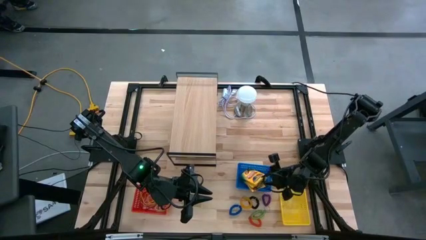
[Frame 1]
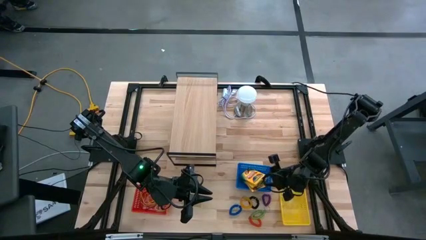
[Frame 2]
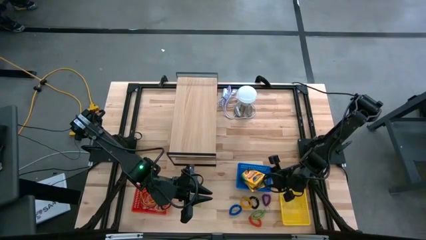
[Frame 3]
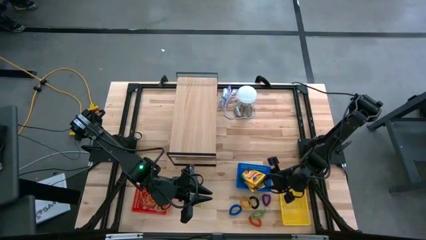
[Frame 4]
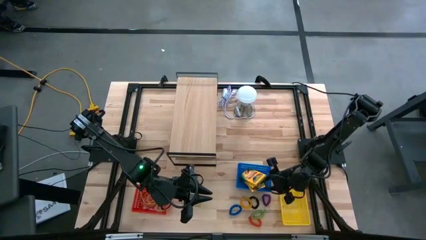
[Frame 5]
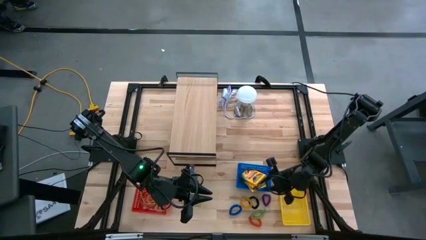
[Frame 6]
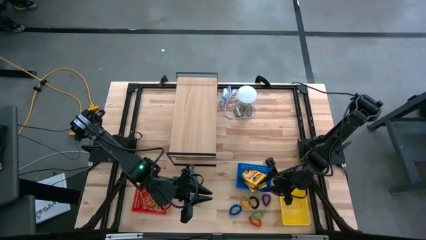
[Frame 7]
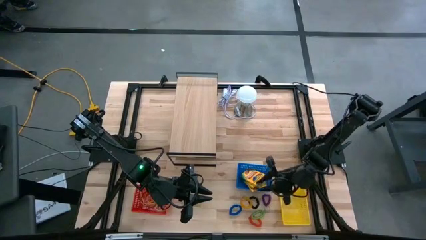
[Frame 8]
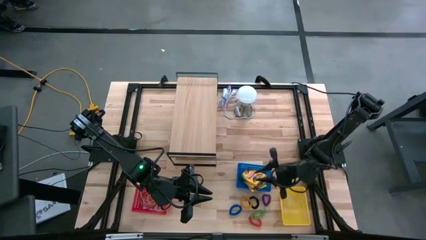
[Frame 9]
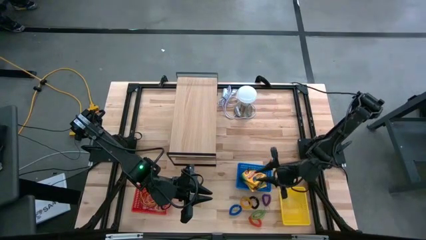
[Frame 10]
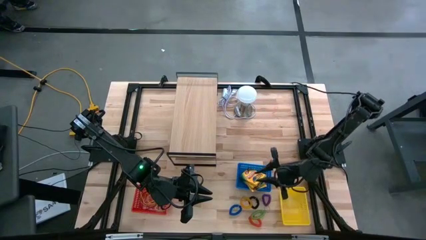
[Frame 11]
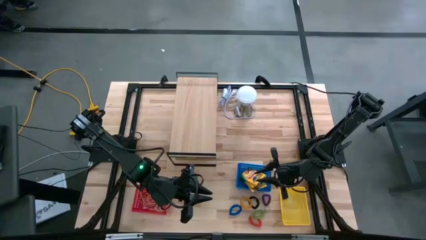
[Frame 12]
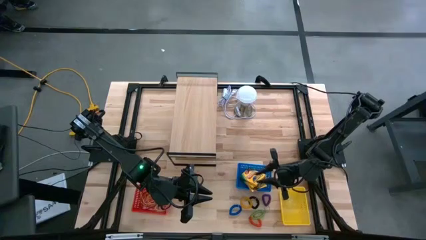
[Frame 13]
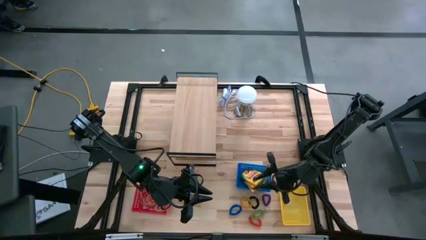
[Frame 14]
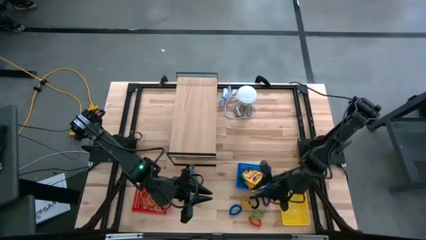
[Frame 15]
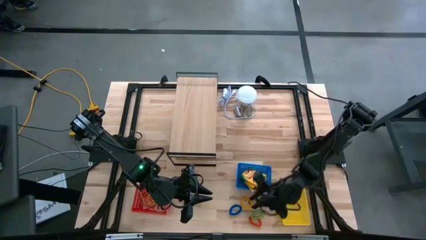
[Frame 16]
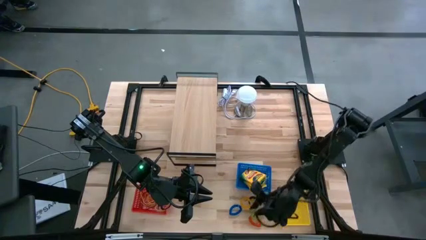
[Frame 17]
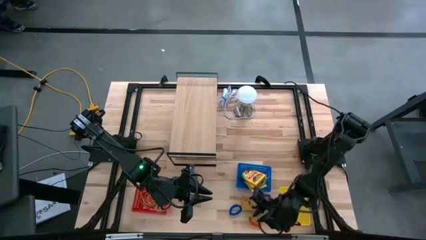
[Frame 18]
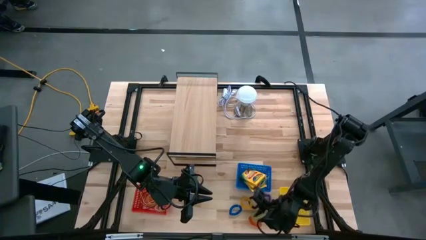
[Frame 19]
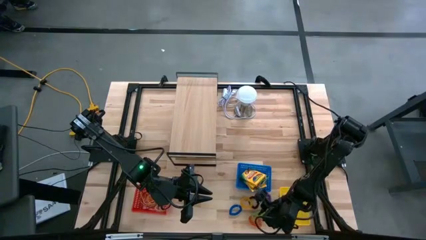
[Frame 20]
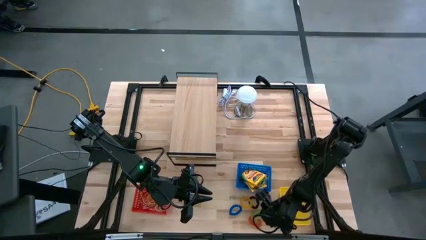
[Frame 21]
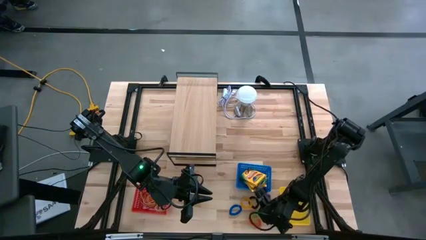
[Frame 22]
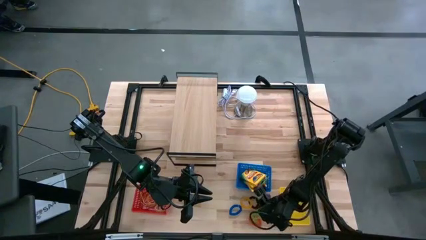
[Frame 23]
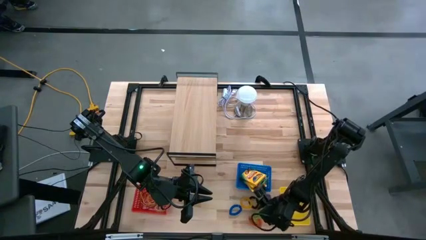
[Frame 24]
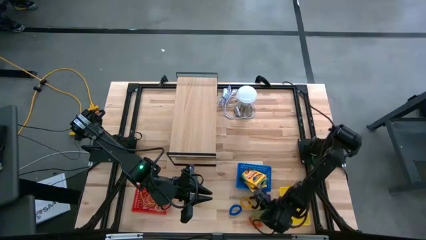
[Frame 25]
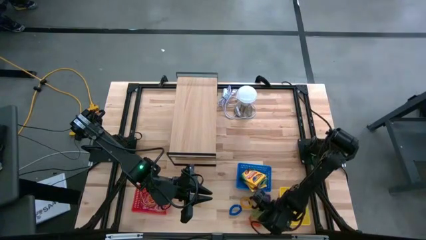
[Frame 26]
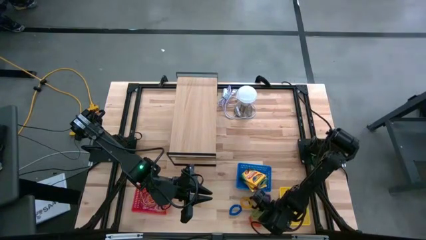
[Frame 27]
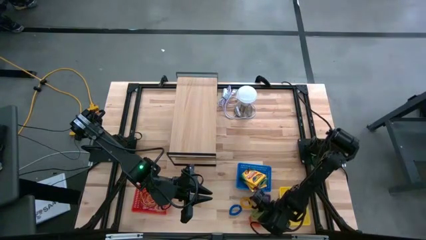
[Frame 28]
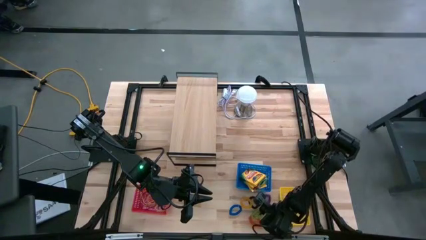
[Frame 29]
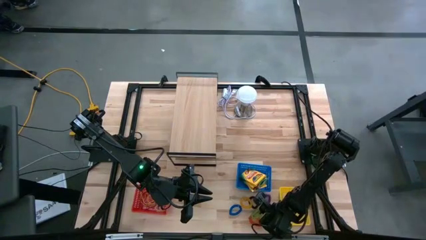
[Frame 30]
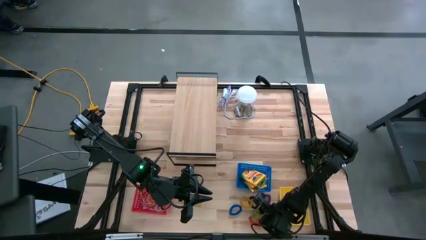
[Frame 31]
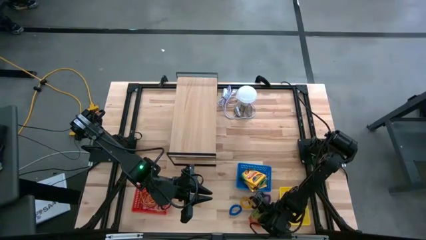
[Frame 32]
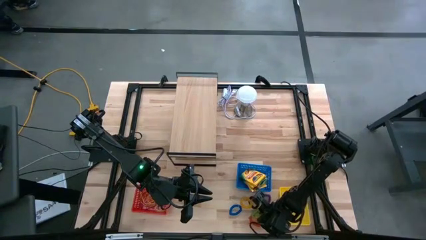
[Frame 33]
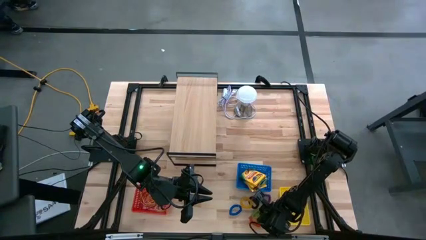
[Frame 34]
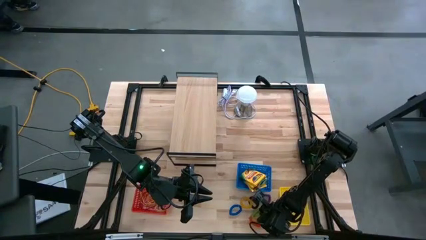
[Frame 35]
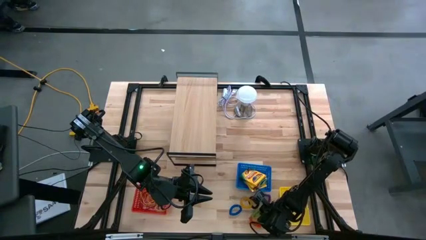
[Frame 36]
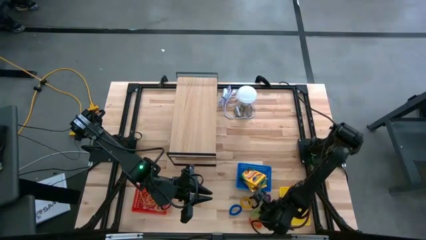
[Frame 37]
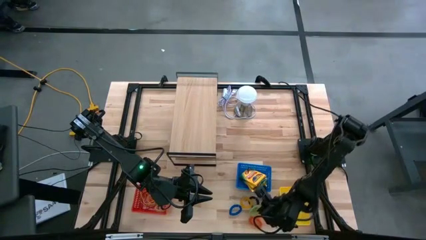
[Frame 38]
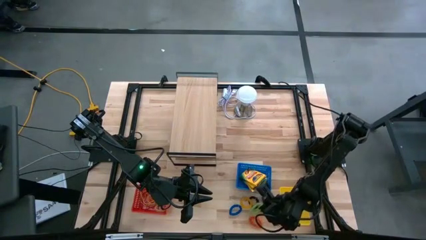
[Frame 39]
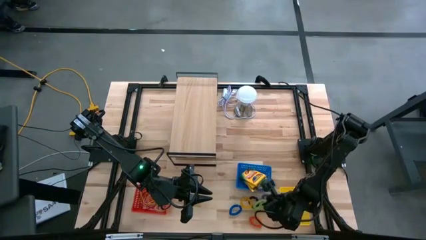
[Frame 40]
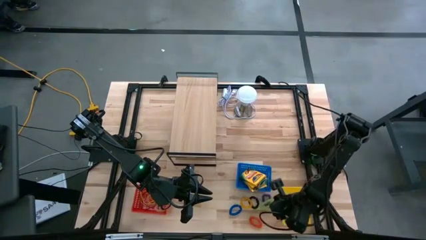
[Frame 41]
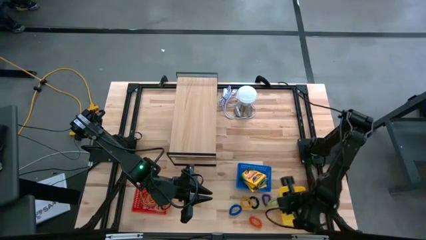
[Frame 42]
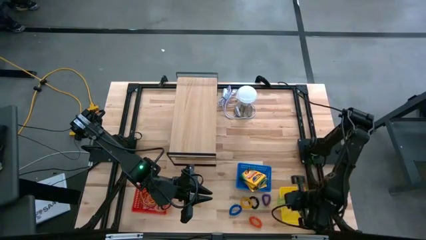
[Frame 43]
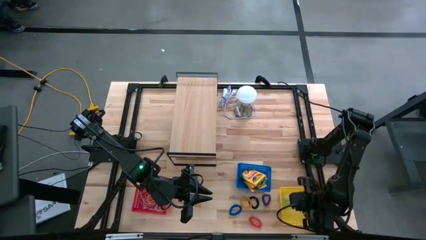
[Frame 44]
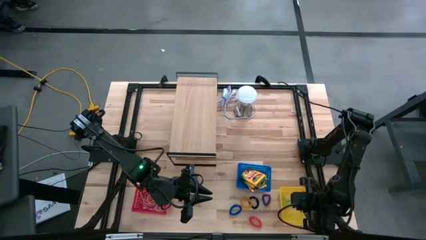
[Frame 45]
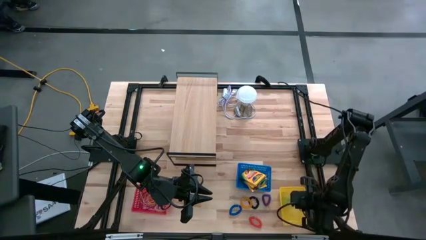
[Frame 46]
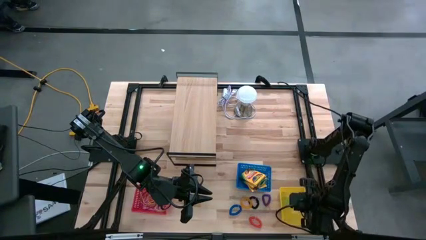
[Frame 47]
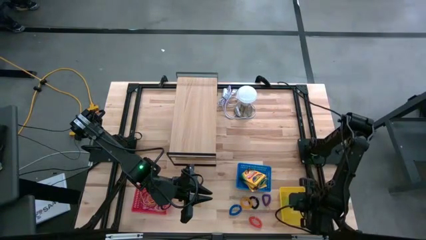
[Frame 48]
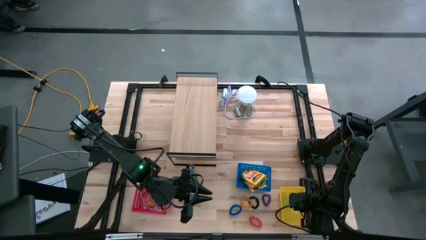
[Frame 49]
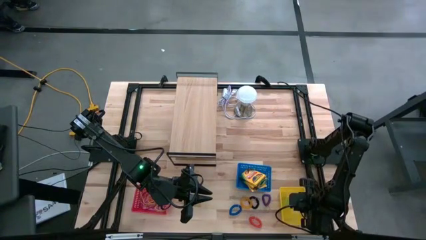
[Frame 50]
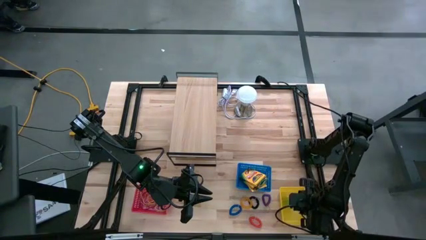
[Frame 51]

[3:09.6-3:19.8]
Task: Pick & Place Office Desk Supplies
Put the green spiral keychain into the yellow bin

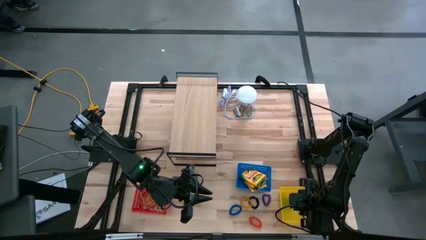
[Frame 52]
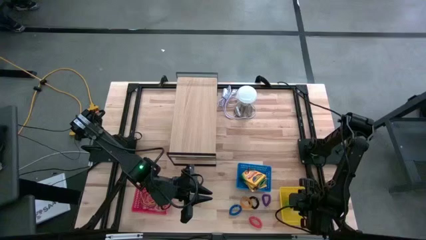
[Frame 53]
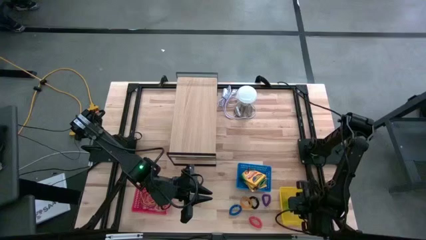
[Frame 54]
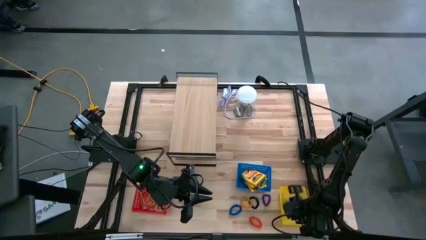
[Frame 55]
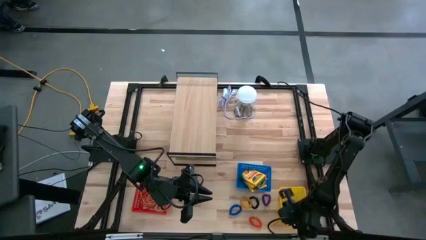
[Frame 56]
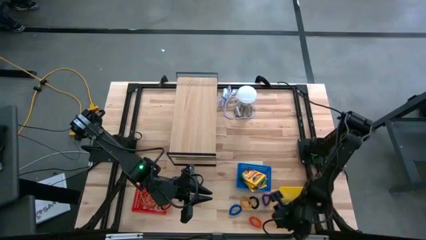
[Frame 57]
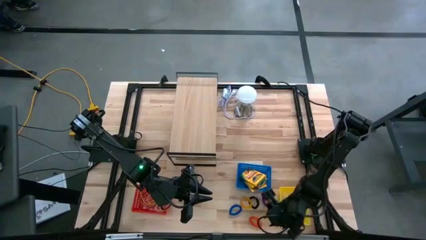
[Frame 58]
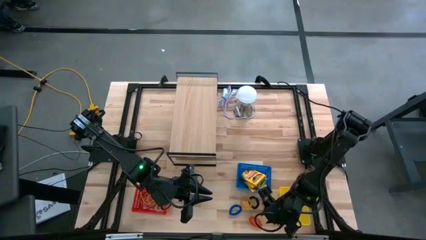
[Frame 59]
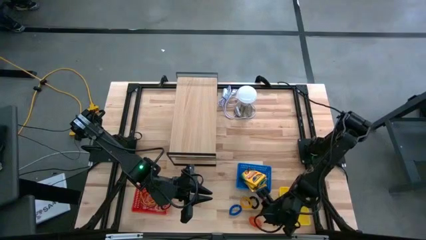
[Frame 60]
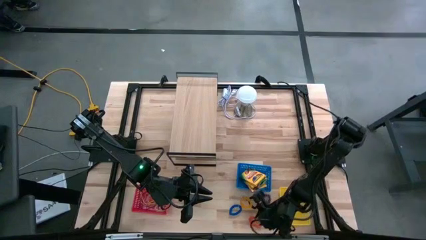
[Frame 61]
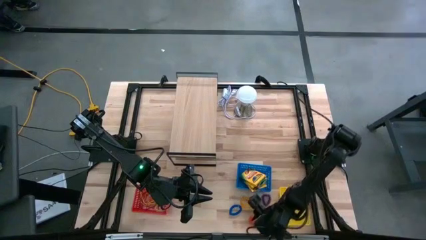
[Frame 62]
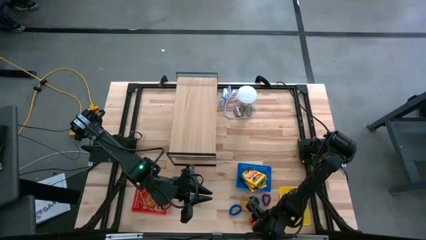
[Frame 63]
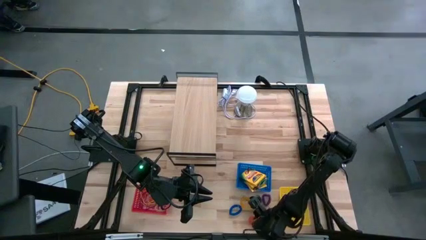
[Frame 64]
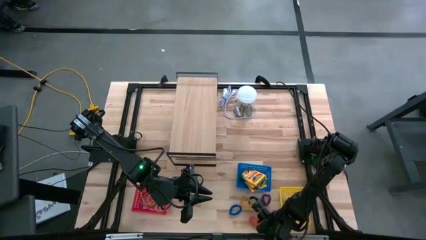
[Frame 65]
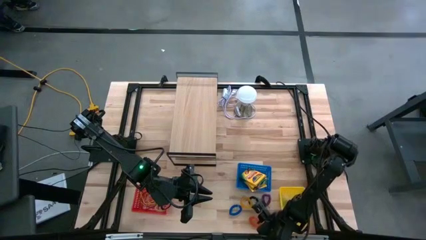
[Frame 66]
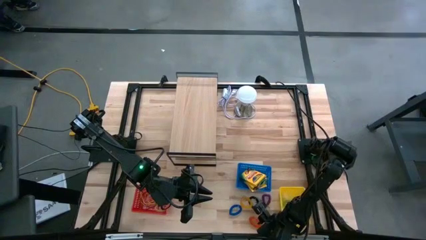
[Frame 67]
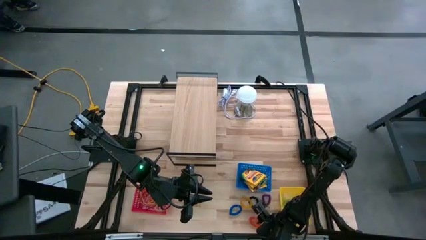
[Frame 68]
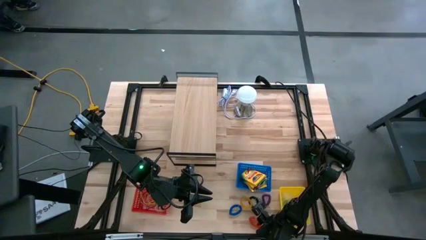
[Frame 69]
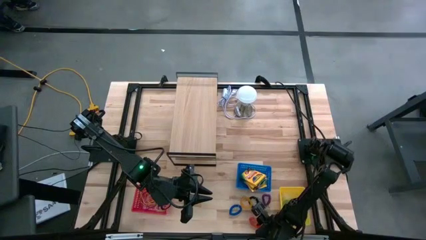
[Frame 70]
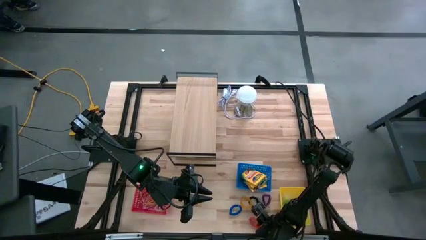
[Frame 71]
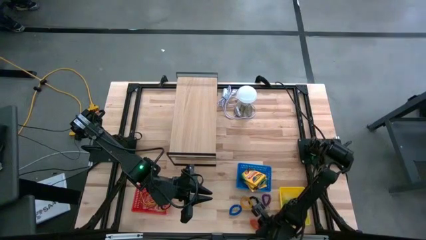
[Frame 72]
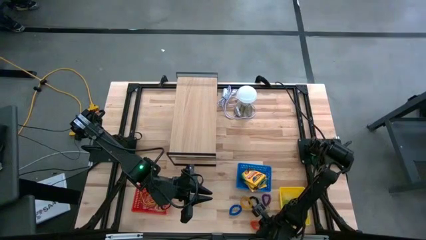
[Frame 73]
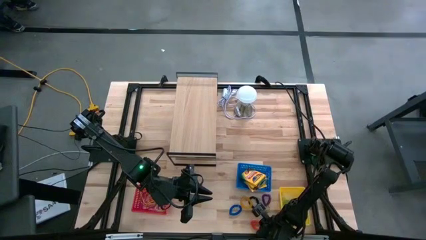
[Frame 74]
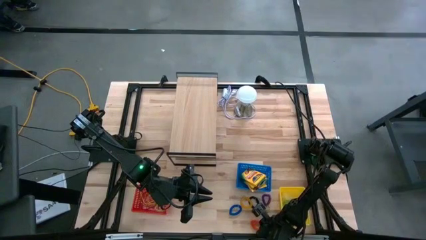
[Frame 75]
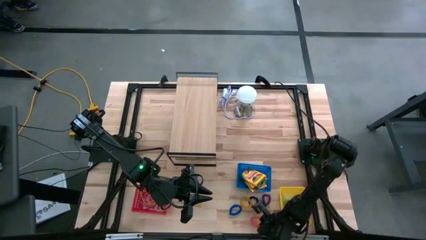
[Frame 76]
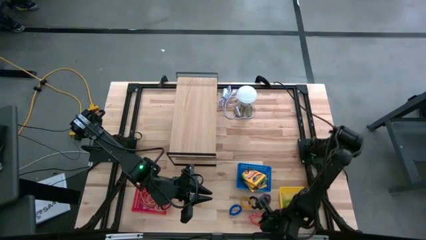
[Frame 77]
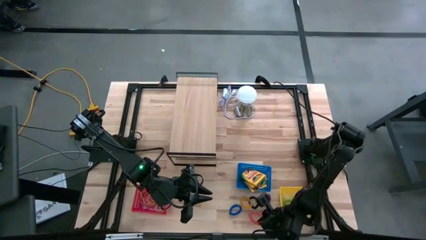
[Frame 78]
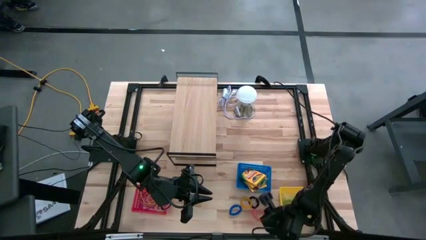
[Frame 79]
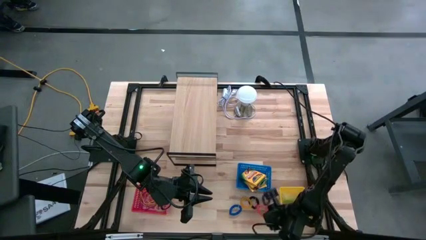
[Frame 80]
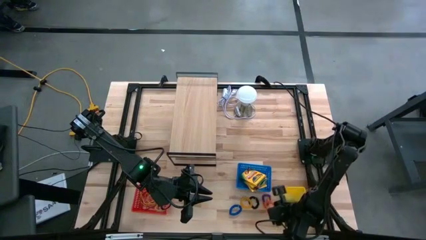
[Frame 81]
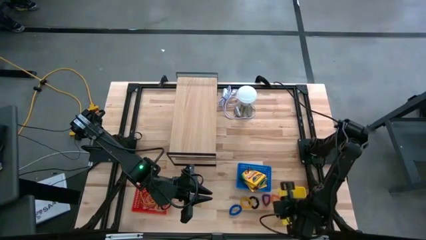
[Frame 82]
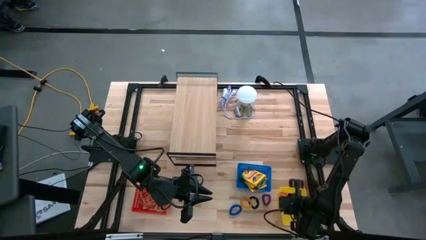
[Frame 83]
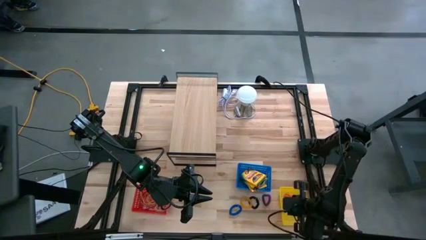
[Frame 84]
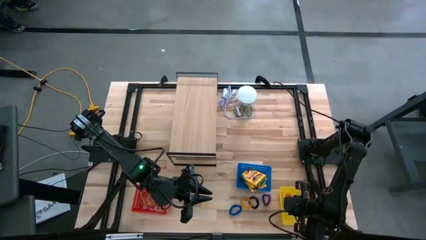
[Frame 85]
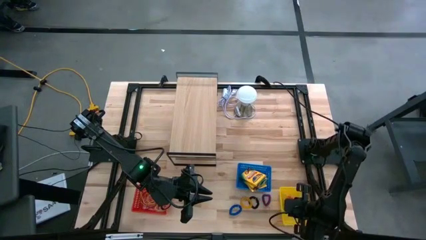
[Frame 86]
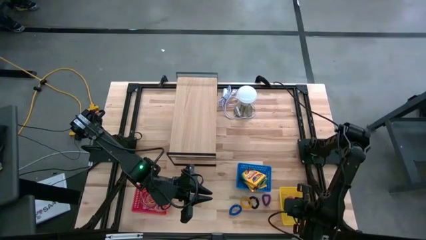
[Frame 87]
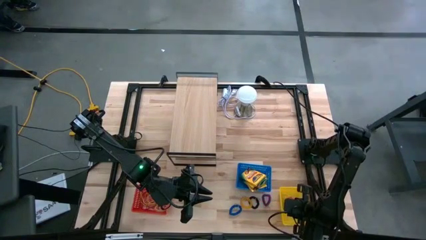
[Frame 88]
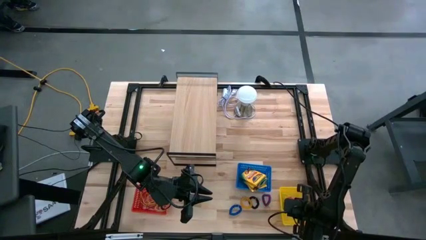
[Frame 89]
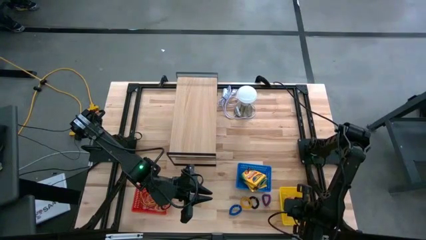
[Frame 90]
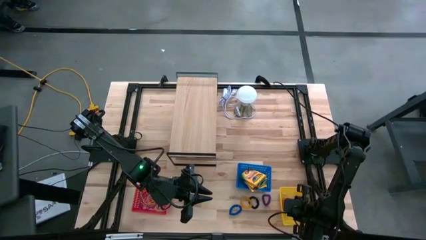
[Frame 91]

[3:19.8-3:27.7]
Put the orange spiral keychain into the yellow bin
